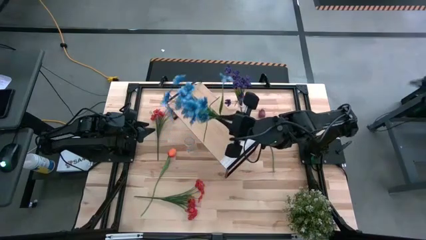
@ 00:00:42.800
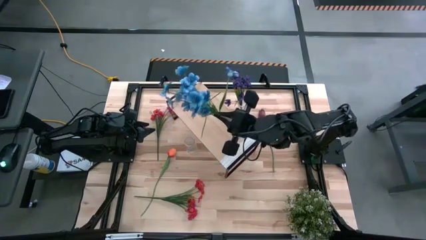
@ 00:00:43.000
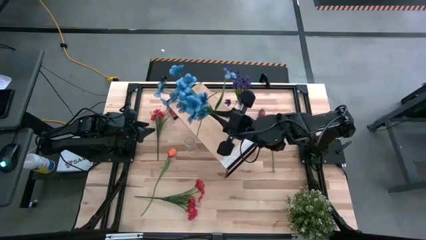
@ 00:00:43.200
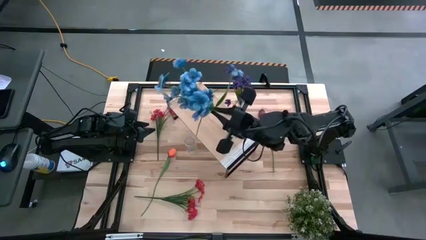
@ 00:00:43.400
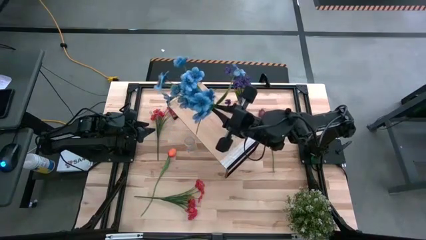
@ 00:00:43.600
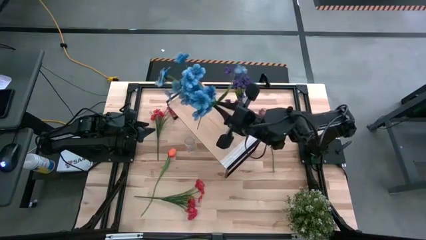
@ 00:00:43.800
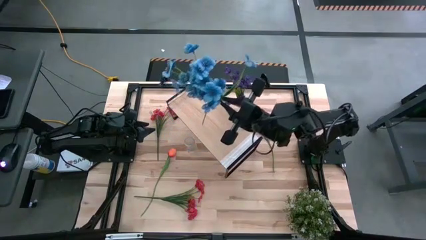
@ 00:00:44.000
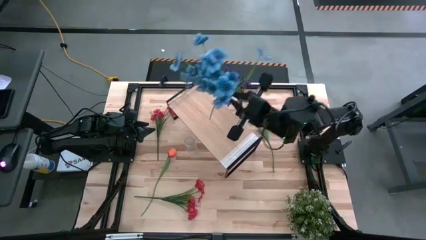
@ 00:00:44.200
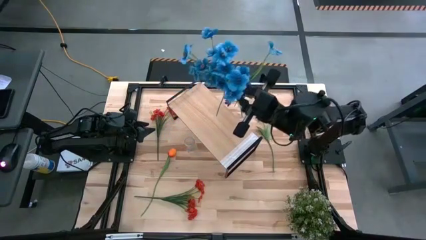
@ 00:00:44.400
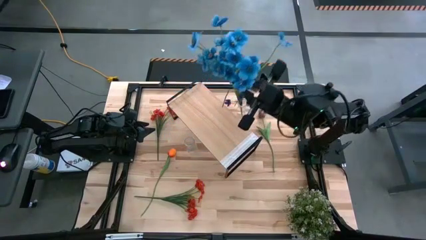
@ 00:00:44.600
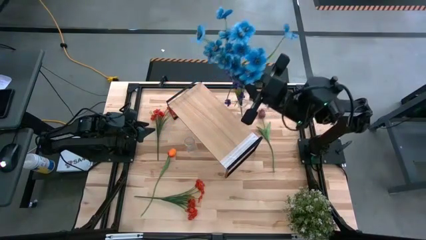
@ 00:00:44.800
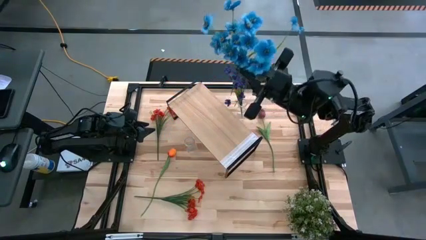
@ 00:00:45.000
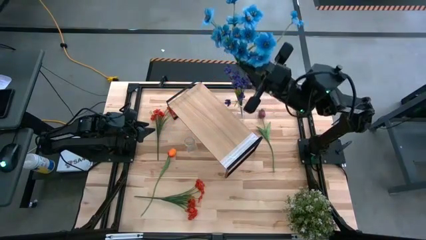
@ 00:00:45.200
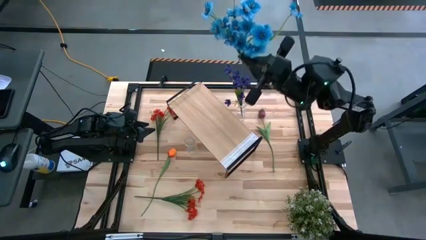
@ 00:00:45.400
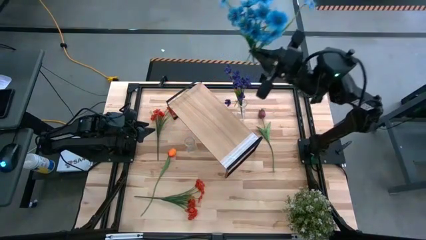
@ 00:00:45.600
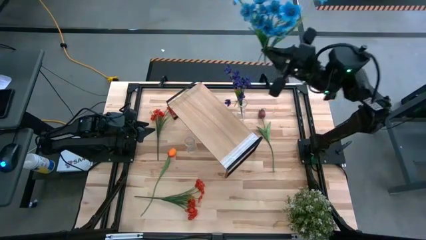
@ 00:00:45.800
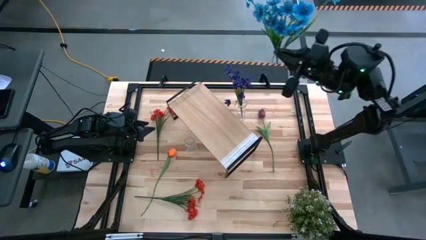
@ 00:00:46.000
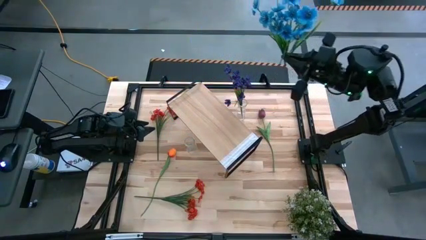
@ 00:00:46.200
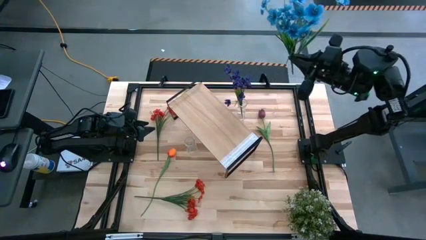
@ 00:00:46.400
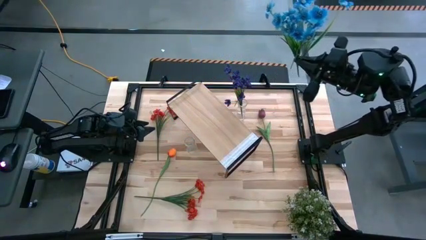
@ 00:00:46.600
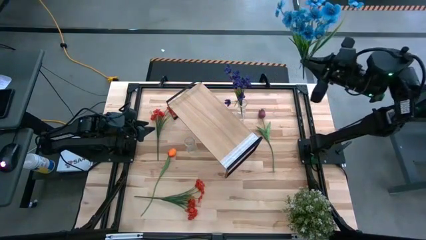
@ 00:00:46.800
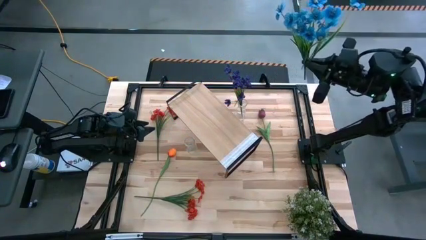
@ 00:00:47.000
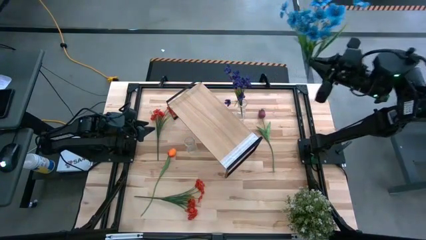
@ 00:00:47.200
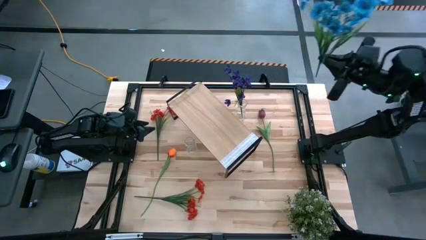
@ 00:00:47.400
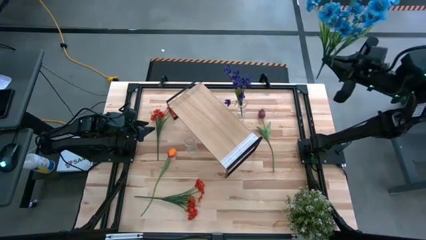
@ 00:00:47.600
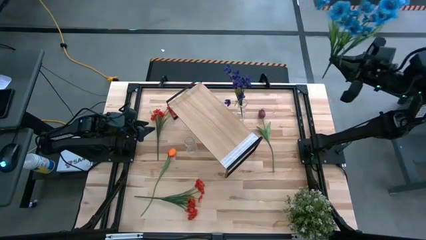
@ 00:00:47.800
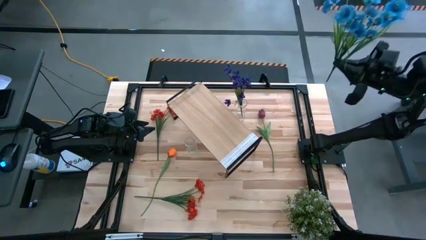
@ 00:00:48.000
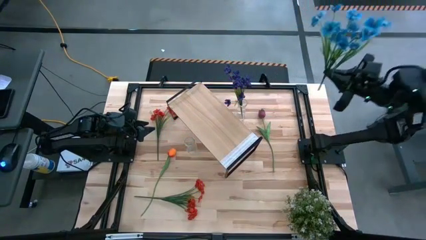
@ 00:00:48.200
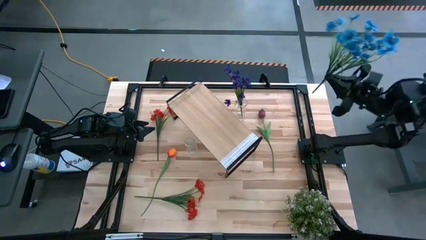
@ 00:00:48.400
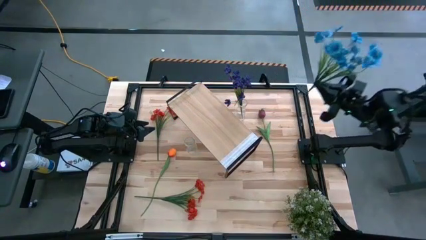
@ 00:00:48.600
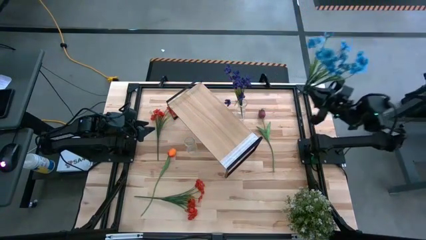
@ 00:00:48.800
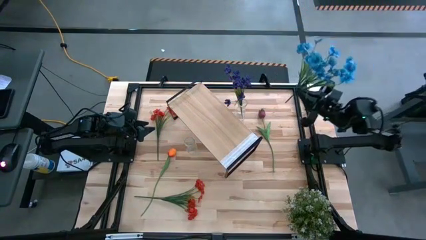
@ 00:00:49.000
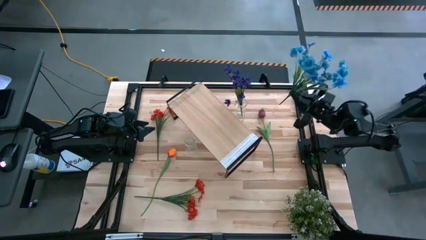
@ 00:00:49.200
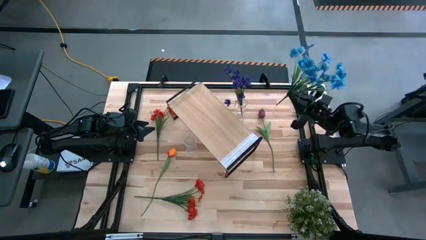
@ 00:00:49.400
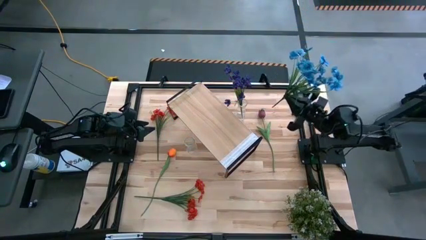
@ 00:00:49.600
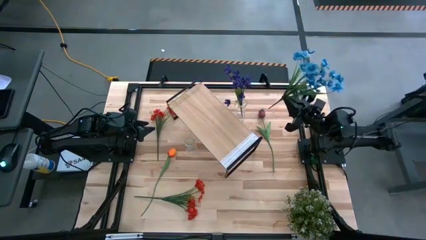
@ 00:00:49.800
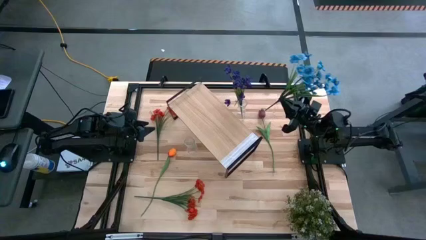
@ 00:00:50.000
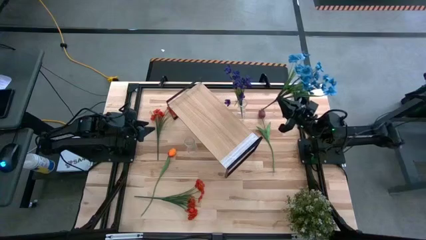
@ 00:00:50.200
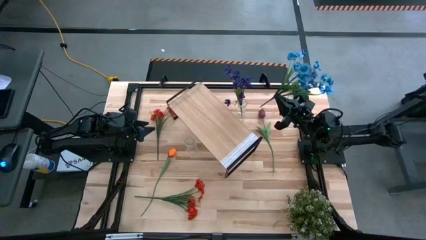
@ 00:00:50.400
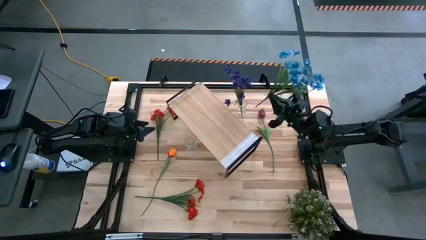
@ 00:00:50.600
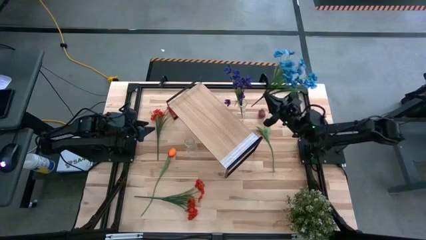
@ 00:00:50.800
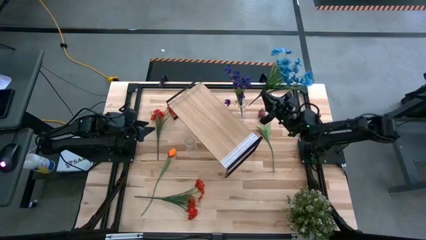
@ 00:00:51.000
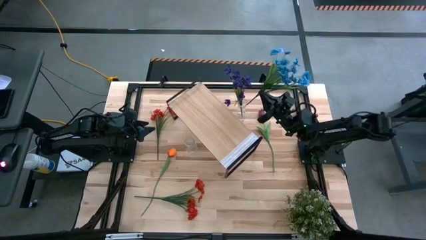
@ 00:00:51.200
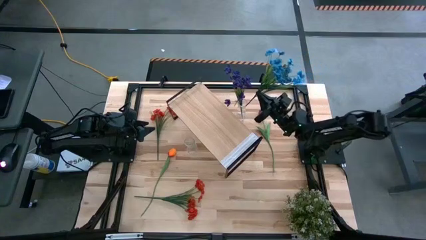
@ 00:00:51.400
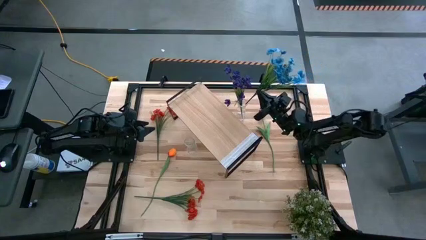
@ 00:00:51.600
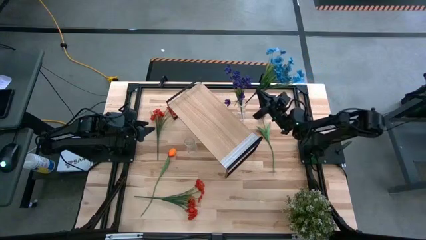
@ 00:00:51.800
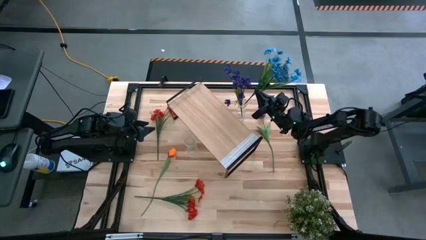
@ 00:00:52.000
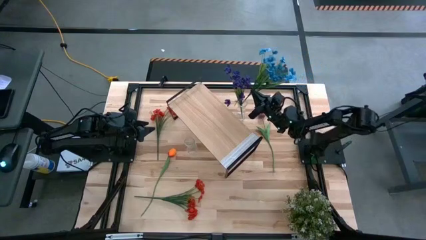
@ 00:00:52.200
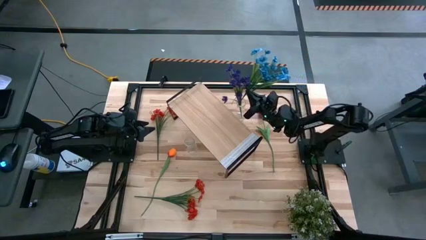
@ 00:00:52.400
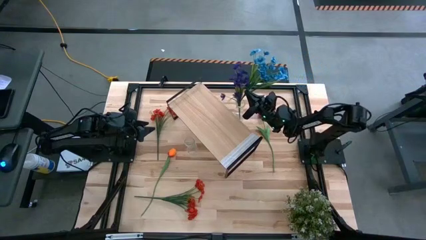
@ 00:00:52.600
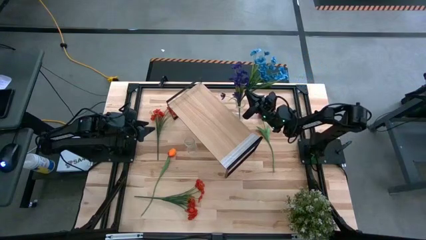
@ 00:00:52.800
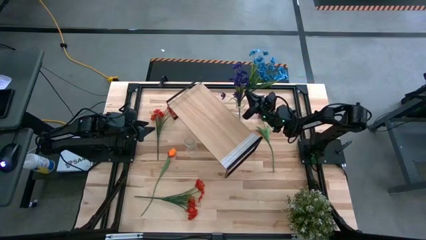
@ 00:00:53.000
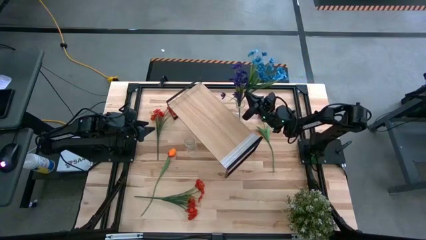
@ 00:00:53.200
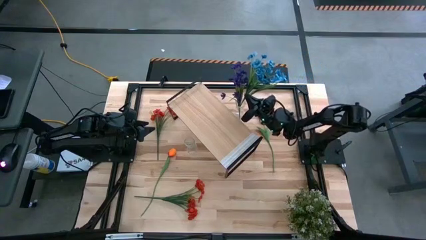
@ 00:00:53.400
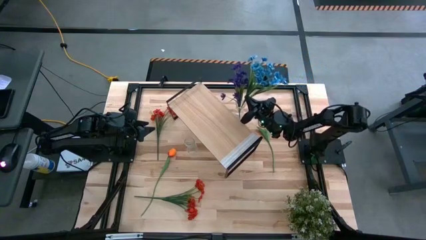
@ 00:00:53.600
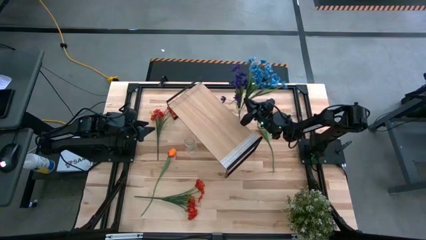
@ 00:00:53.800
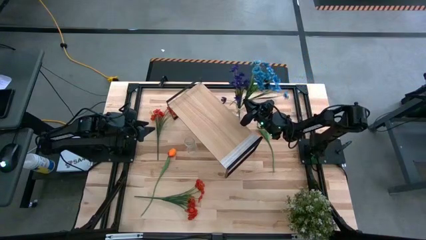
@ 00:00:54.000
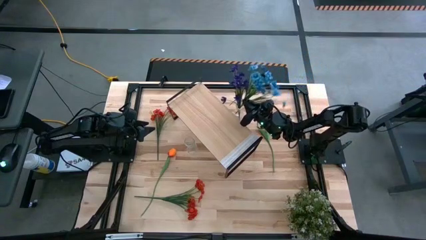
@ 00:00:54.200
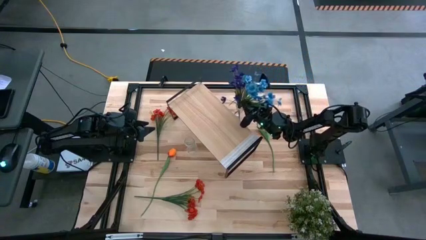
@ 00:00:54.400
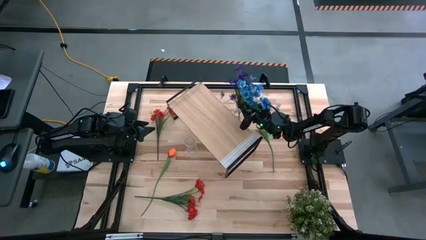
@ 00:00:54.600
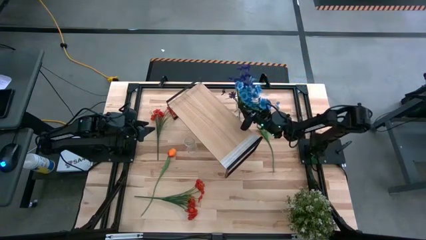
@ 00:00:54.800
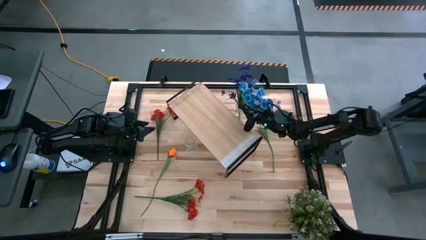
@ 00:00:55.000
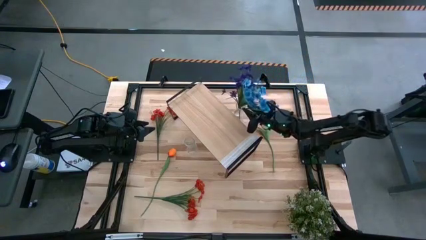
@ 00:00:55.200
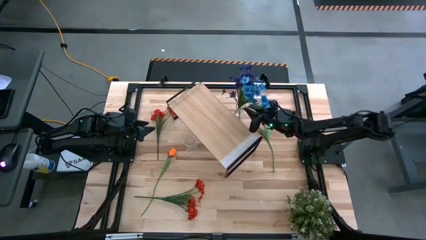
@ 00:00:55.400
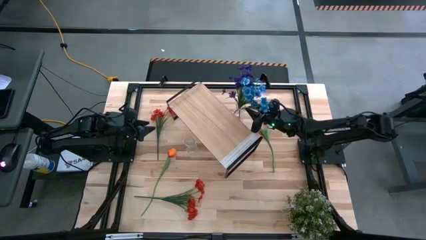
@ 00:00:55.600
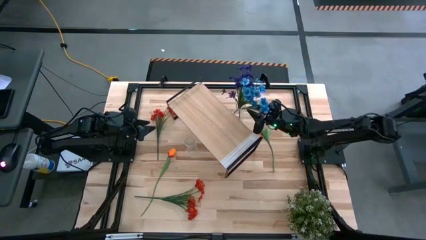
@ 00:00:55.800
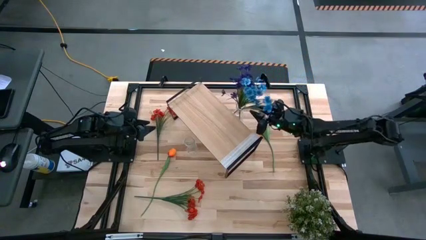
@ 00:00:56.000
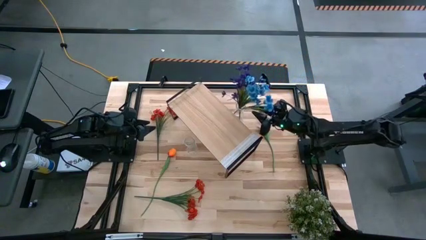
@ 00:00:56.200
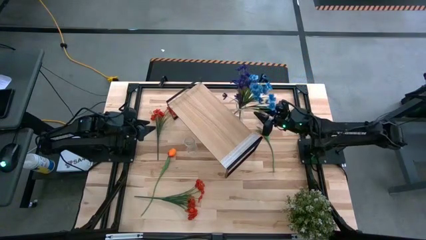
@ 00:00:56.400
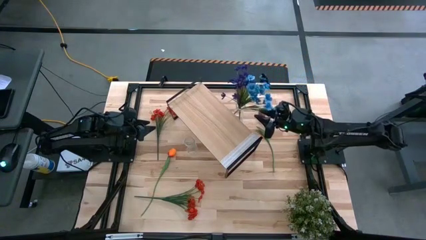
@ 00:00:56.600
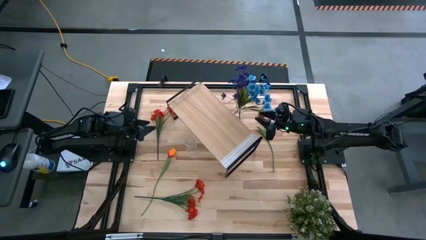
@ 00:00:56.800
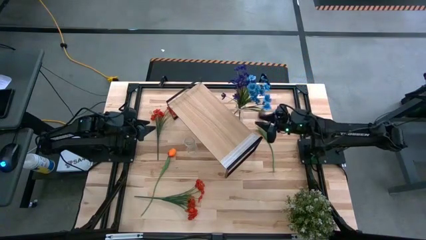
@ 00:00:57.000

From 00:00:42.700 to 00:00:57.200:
Task: Pick and place flowers into a vace then onto a shelf
Put the blue flowers into the top transparent vase
